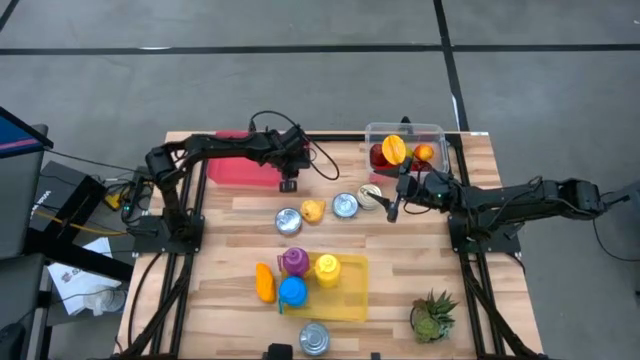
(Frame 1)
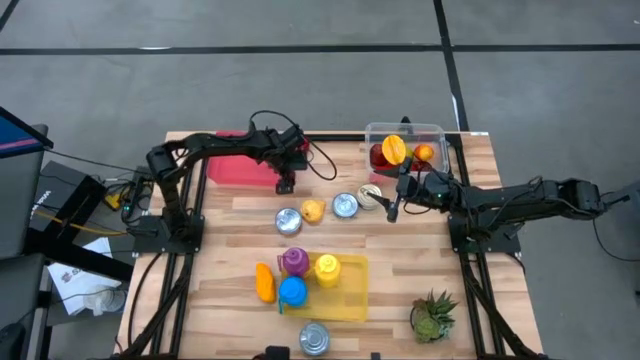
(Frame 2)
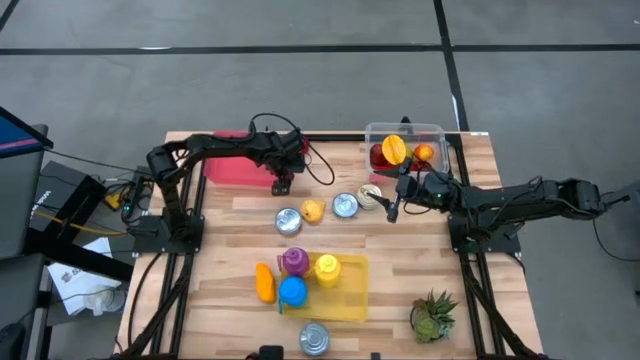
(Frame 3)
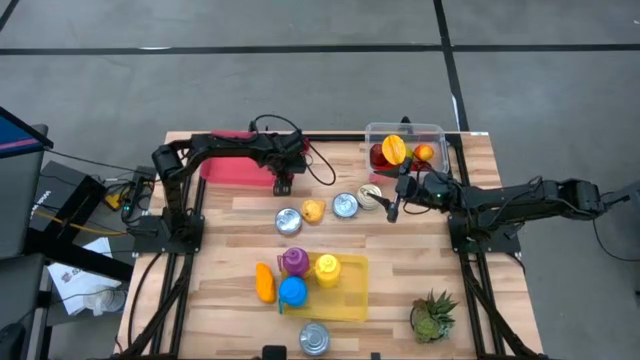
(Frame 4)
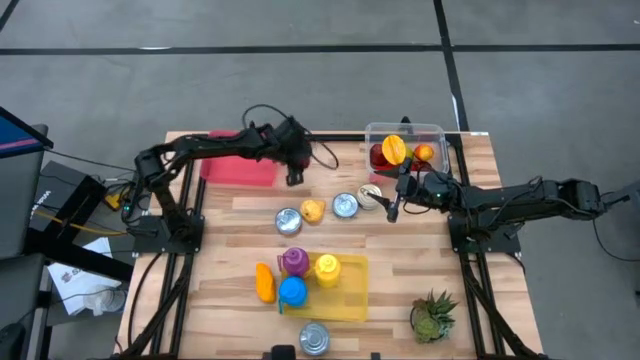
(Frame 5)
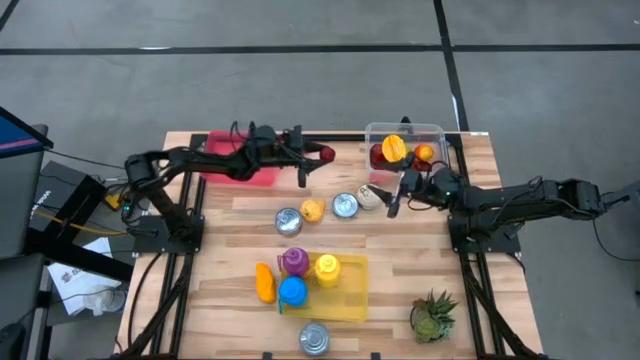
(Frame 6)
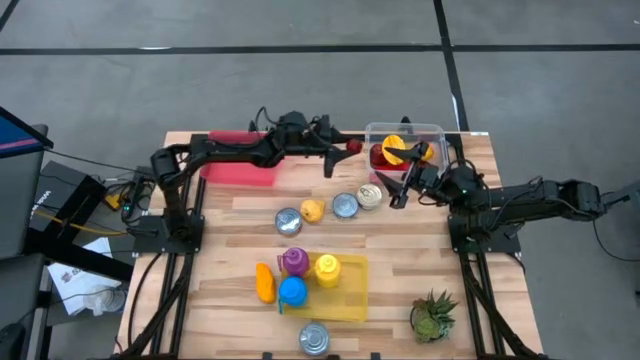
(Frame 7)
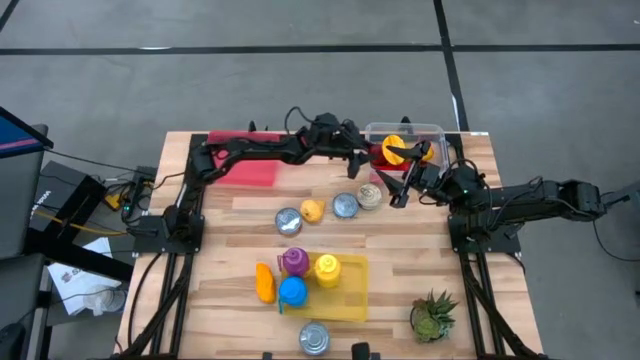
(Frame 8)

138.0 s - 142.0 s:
Task: Pick & Place Food Item
Put the pomegranate into the transparent bin

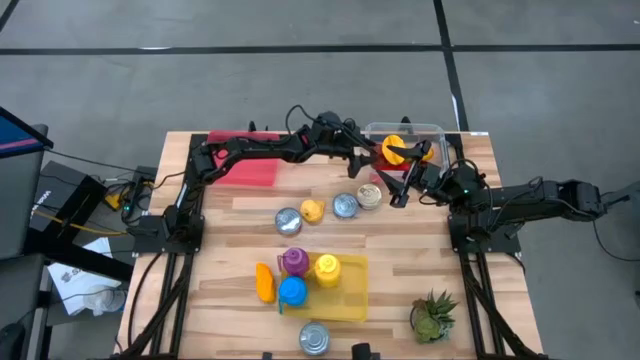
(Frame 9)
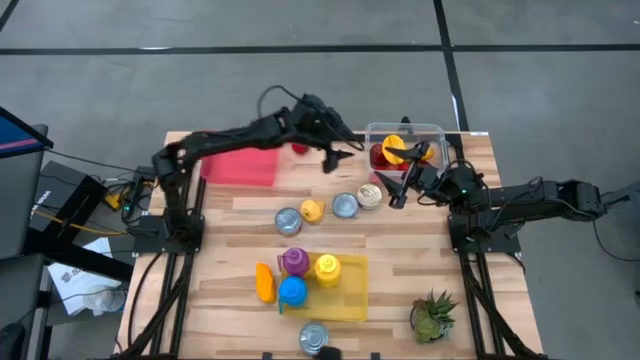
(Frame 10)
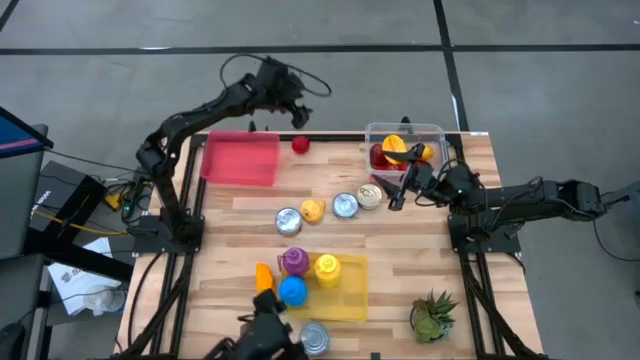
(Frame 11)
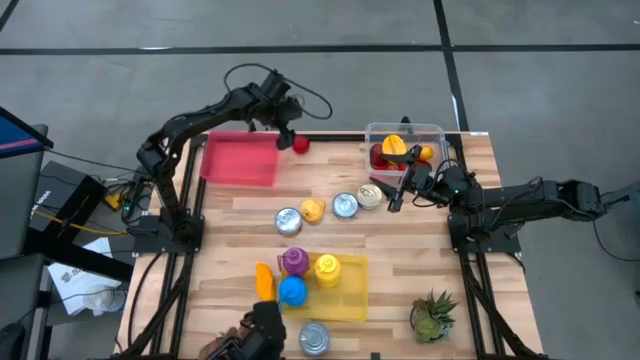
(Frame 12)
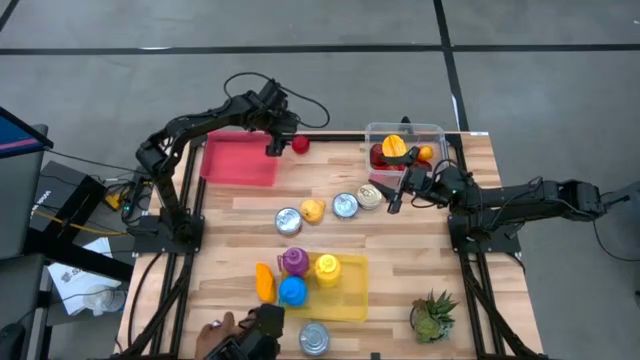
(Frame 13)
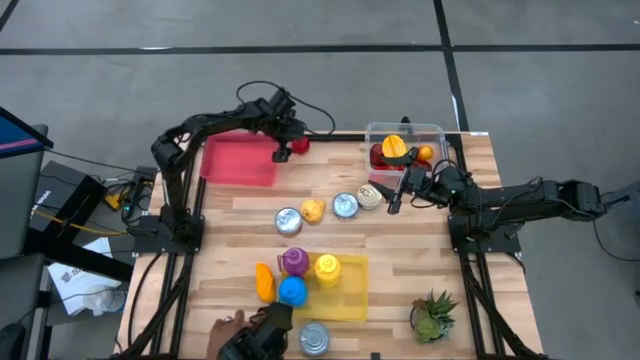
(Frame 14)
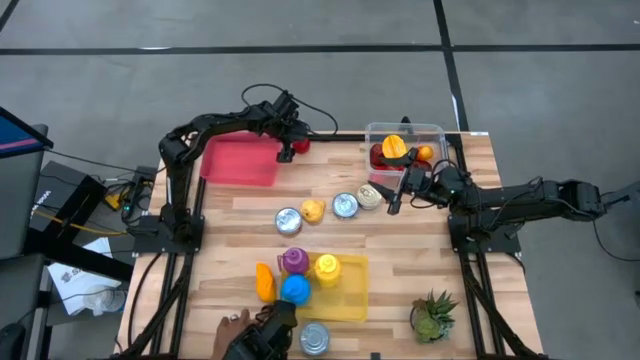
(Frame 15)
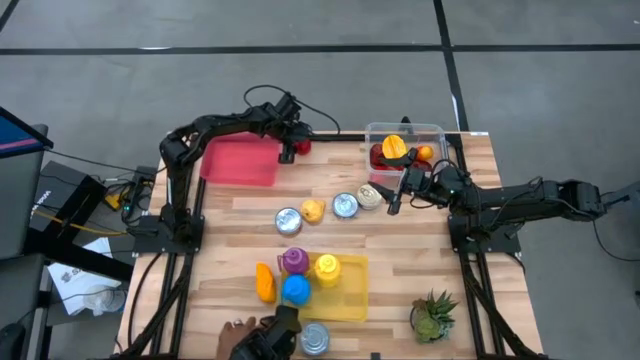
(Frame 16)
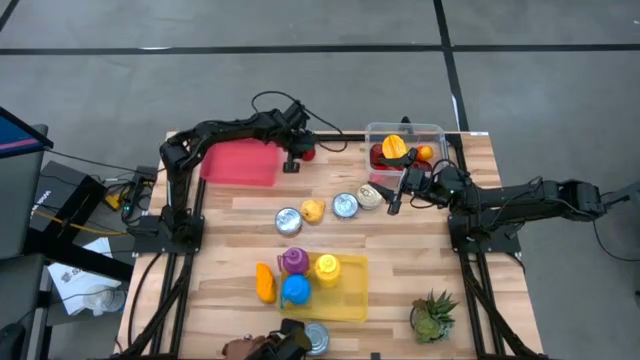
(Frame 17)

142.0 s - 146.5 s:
Put the red apple into the transparent bin

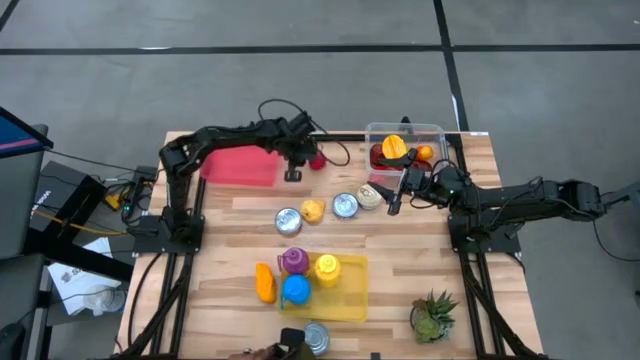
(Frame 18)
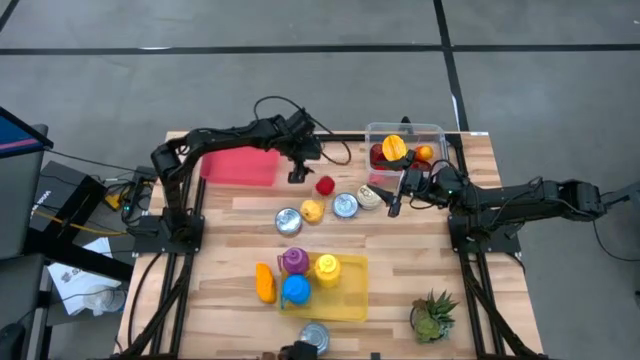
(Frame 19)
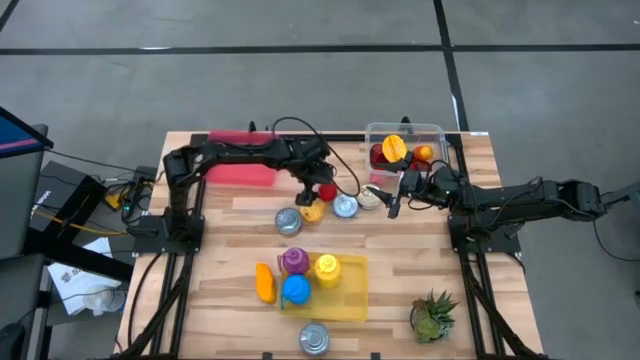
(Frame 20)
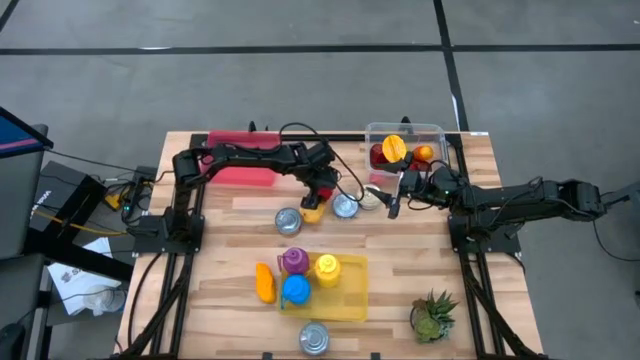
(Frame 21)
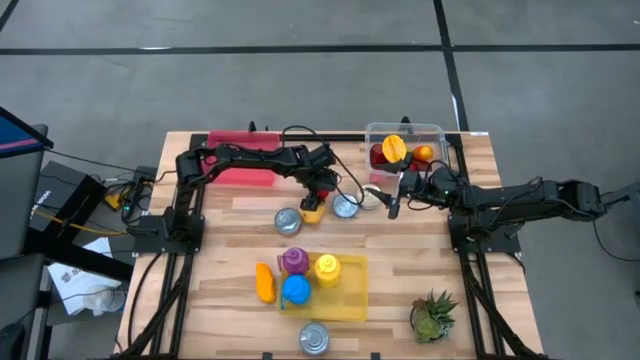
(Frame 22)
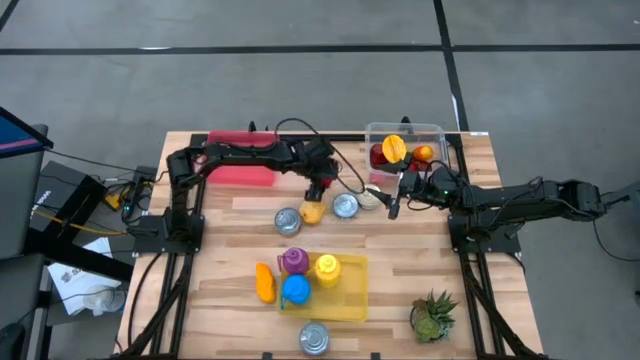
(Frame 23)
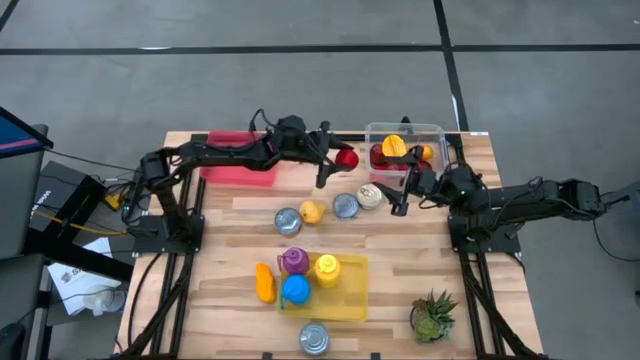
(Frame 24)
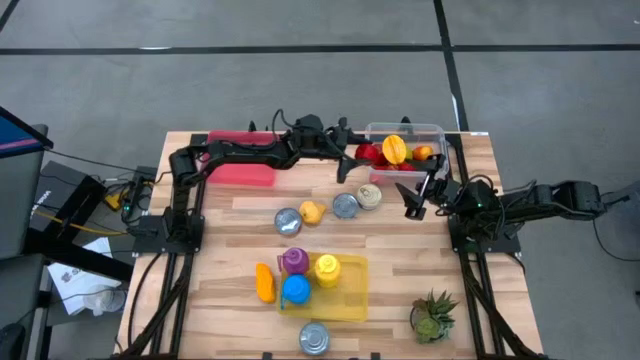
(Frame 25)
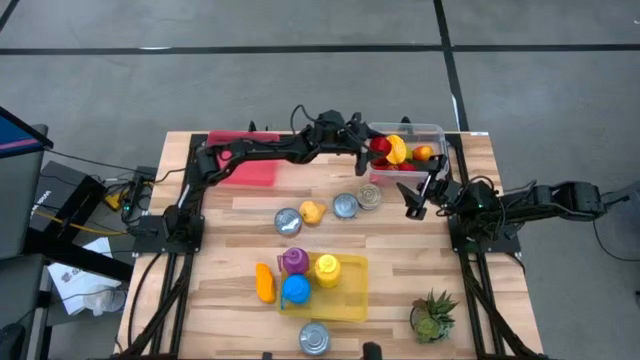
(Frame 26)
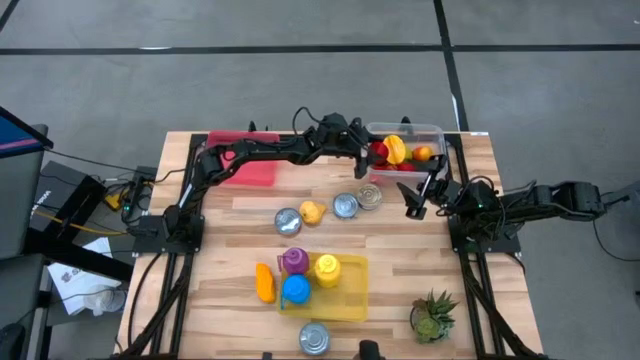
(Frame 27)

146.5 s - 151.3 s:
Put the red apple into the transparent bin

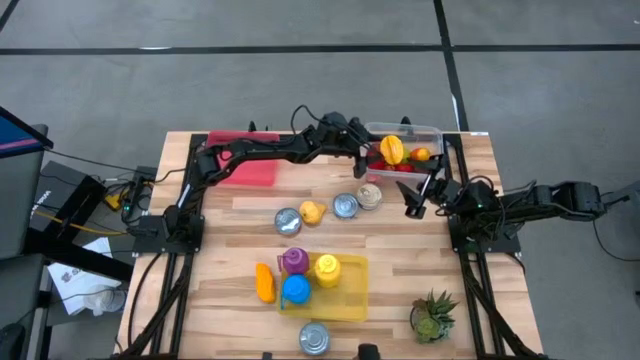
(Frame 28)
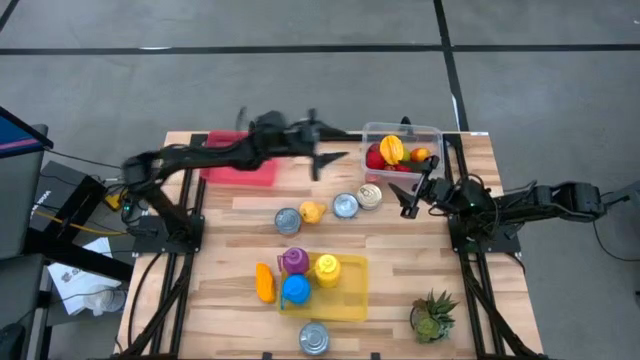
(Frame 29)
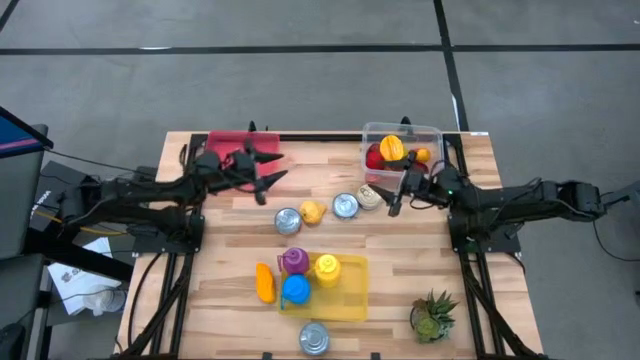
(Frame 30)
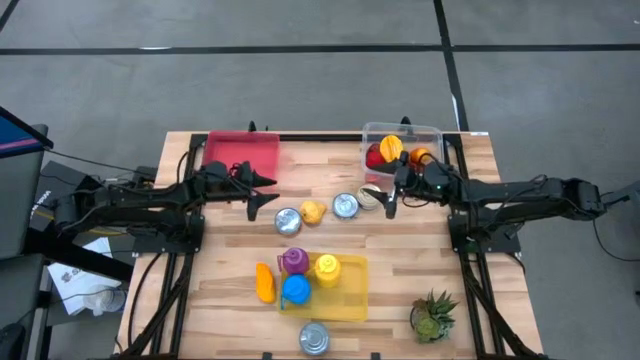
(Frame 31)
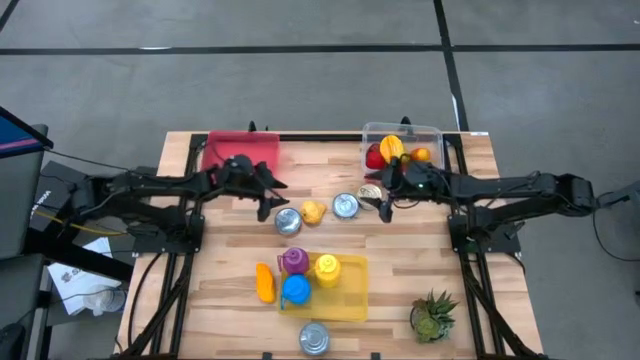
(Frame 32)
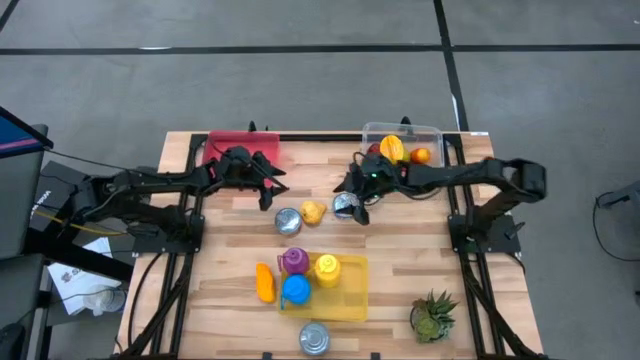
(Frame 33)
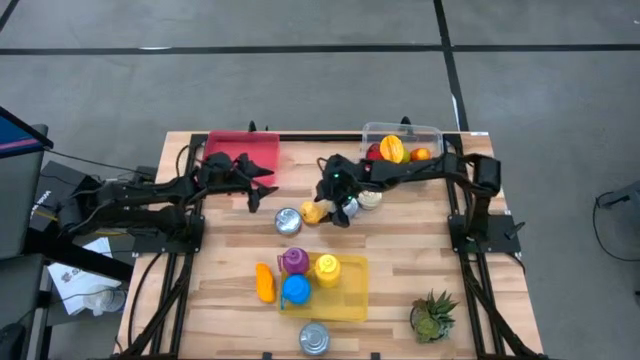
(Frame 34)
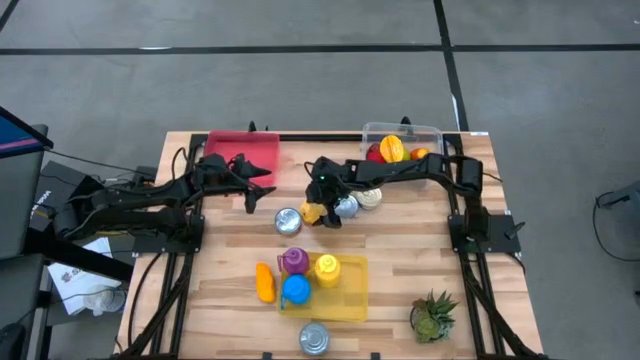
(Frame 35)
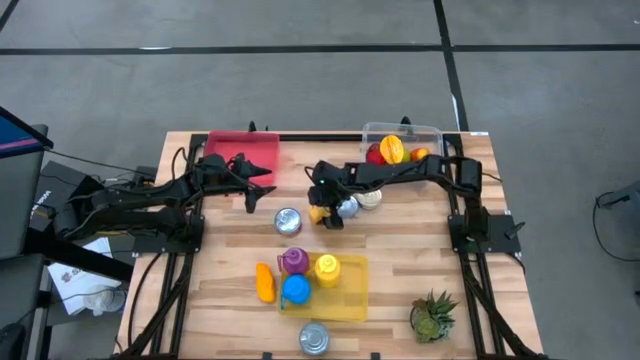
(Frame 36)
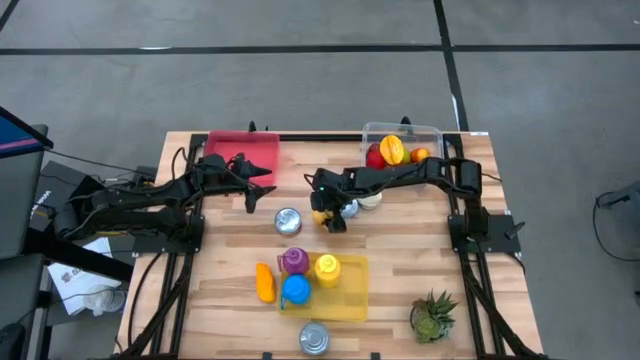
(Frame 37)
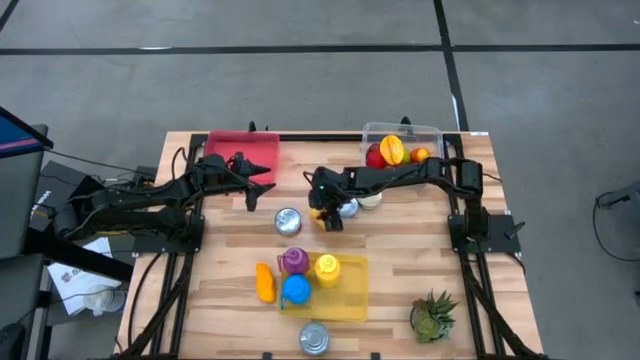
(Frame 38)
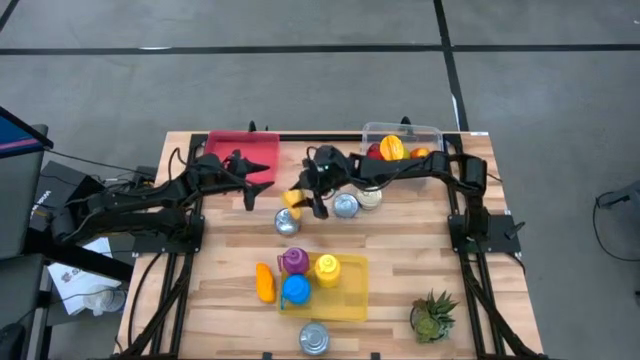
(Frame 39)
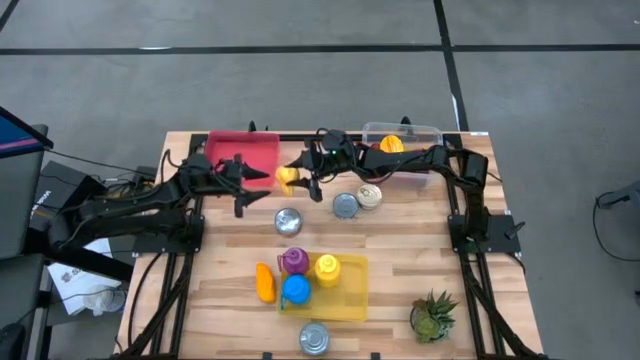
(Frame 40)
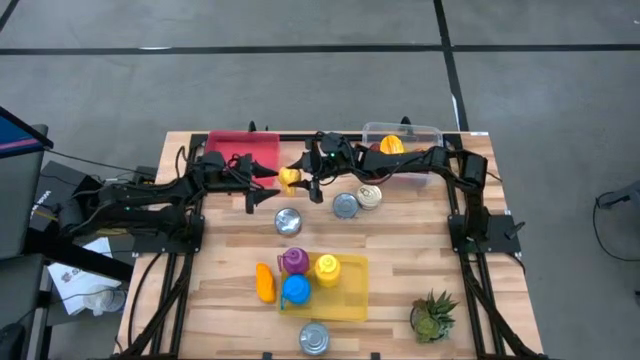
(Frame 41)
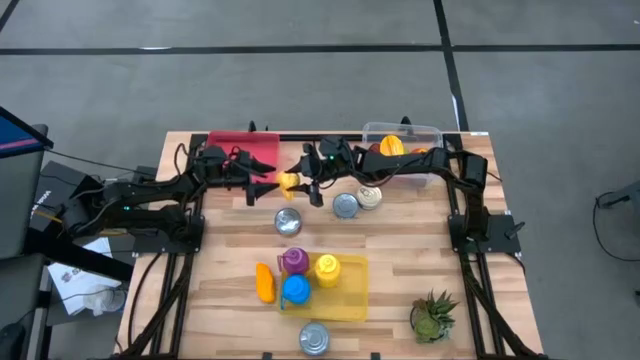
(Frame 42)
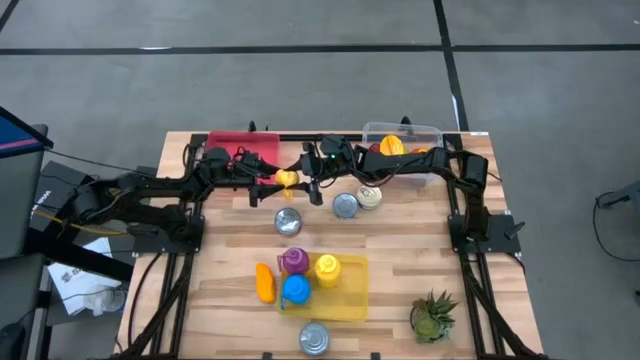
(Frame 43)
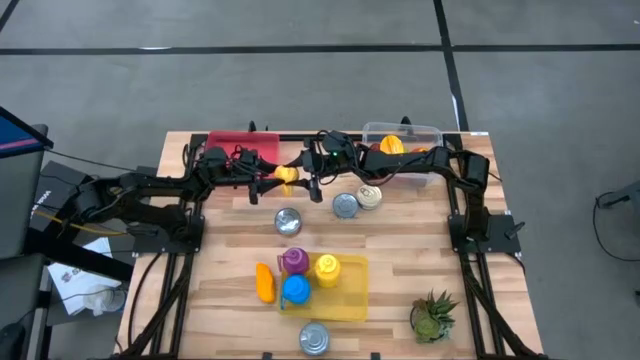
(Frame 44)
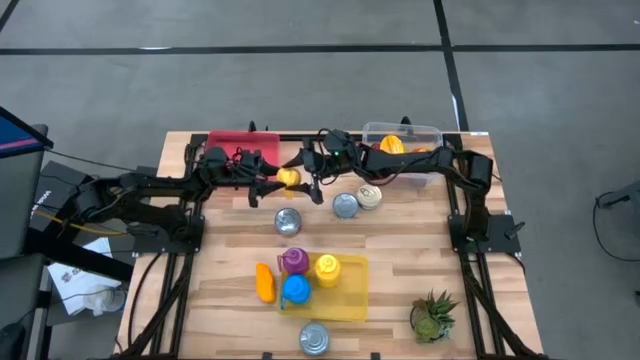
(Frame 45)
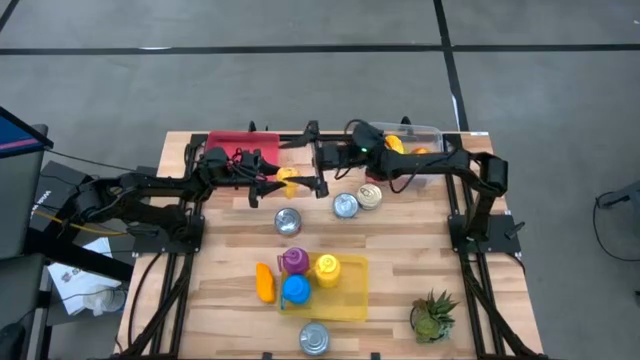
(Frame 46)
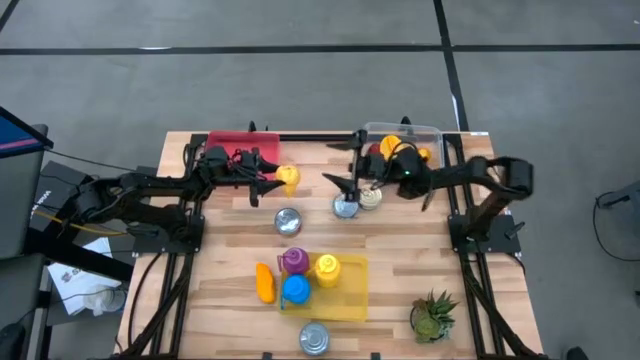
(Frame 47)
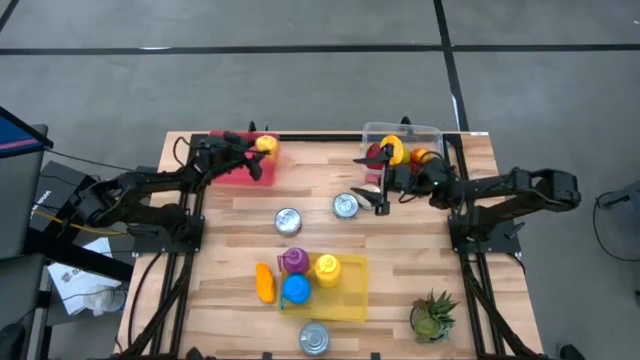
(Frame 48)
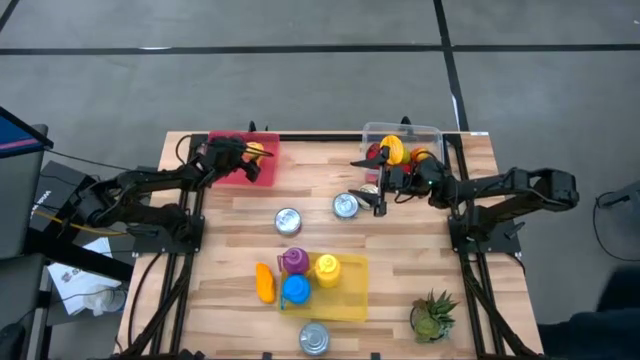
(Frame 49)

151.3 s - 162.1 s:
Put the pear into the red bin
